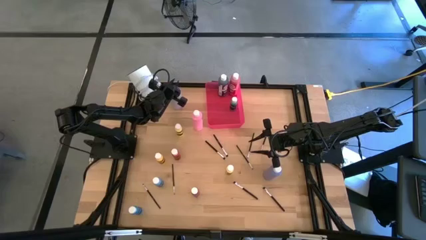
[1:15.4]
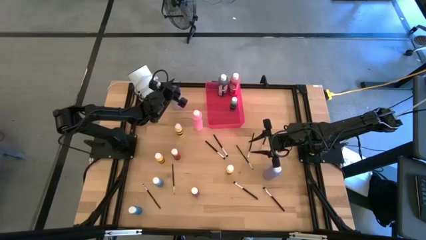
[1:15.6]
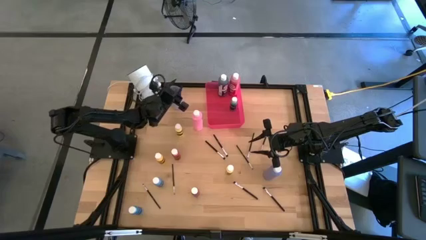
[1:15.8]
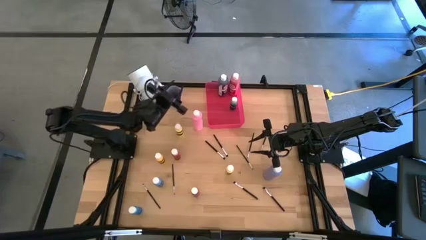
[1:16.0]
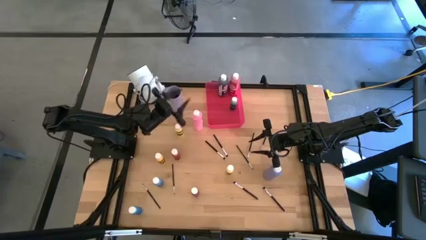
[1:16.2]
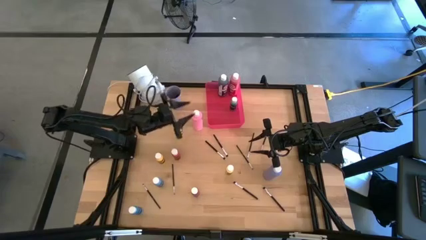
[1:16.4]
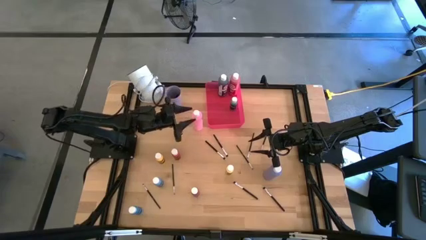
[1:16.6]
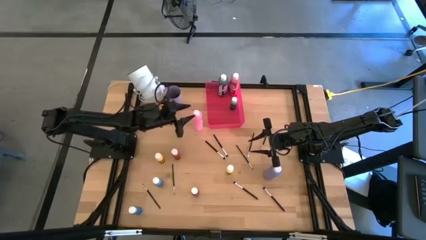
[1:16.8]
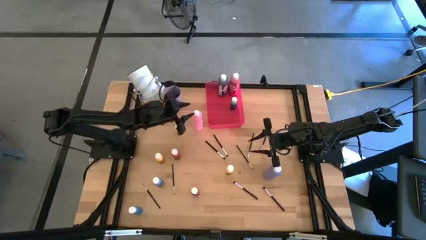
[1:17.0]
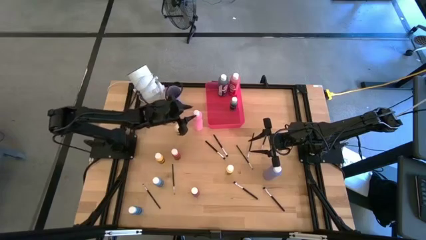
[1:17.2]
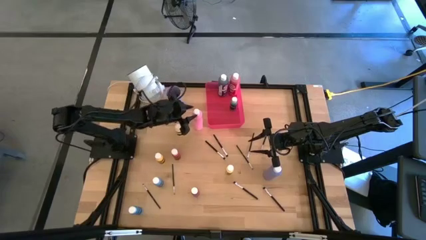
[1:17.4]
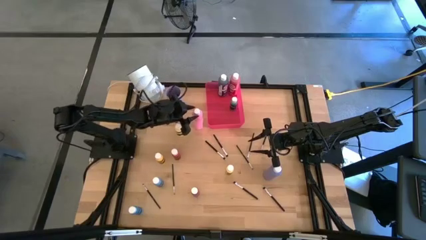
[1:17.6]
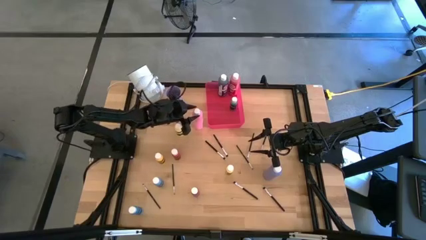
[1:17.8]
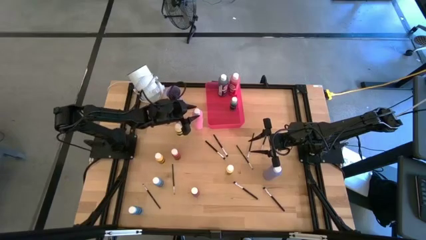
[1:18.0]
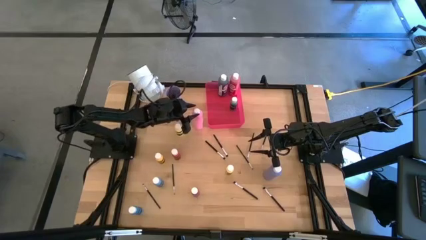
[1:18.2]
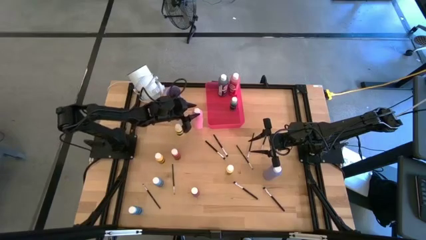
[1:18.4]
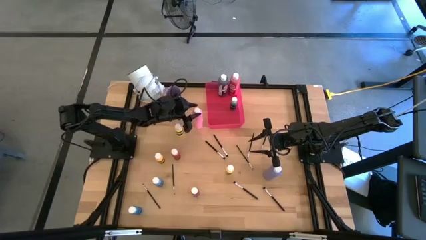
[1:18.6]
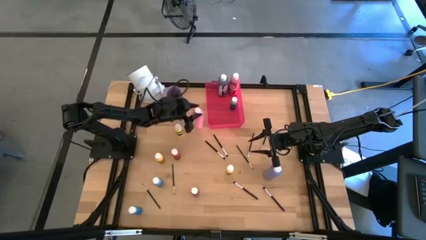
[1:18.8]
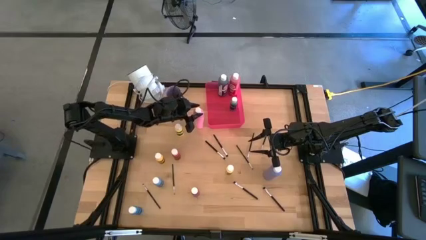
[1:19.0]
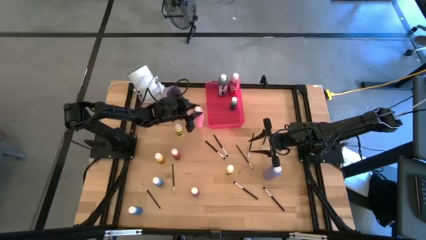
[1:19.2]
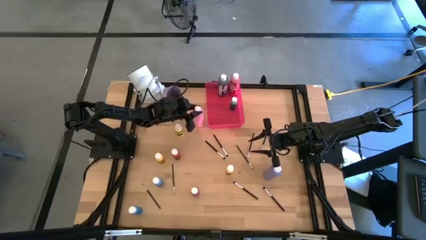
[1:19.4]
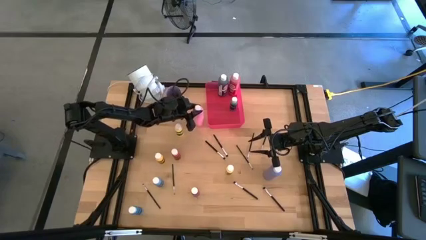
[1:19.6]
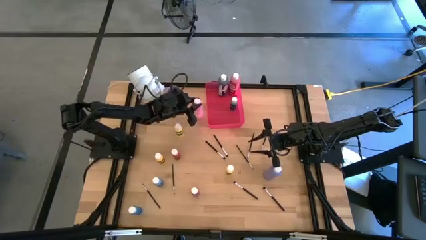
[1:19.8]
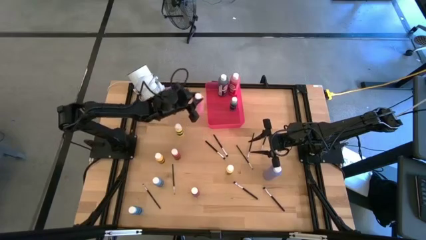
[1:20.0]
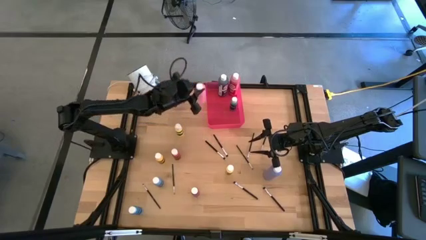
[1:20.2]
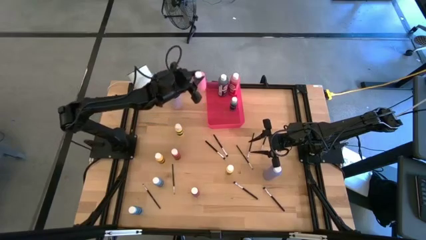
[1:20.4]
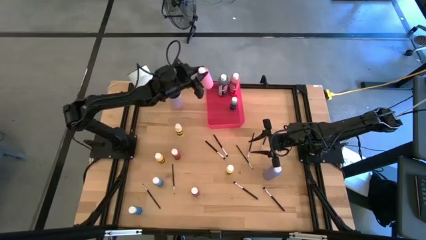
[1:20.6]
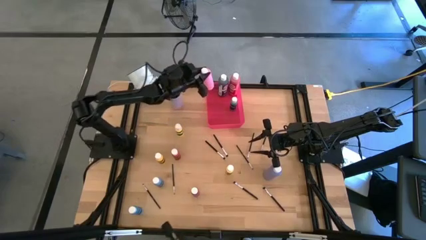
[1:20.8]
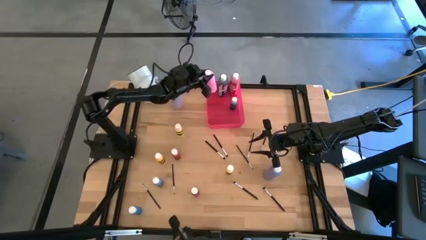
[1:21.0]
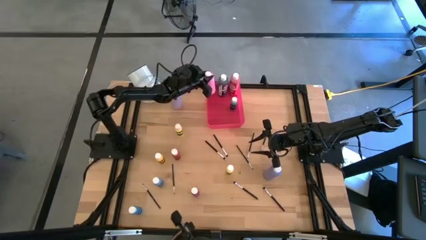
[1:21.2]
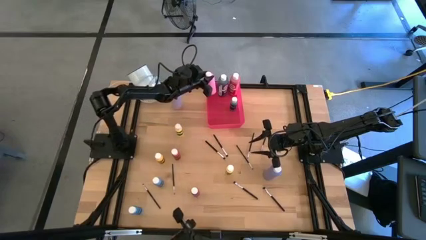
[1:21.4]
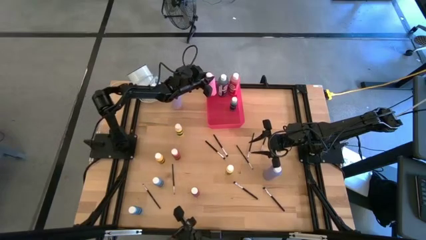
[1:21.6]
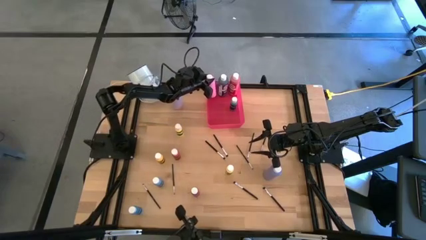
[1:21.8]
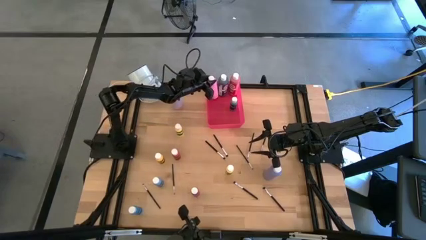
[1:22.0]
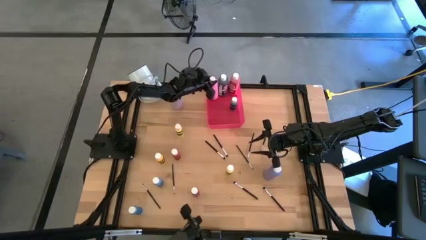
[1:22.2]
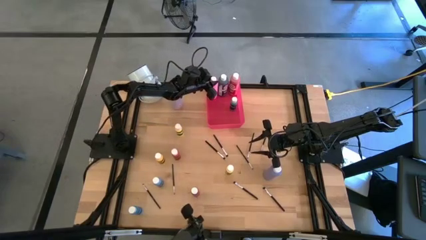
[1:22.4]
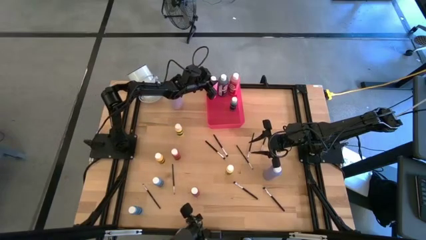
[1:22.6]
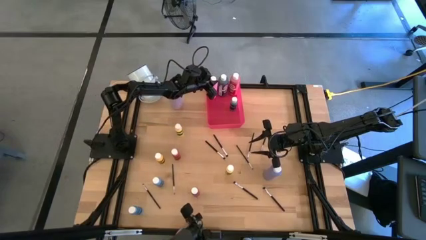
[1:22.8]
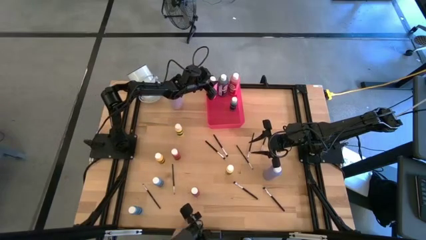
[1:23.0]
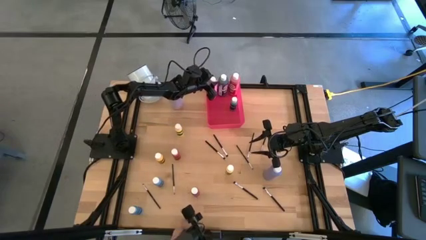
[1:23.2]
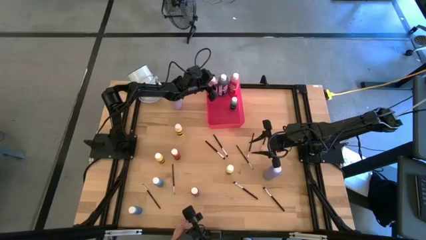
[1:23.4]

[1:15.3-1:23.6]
Task: Pick & Place Paint Supplies
Put the pink paint bottle into the red bin

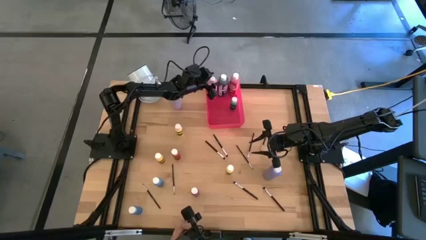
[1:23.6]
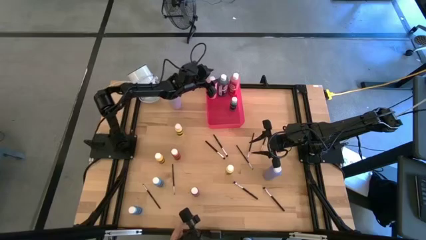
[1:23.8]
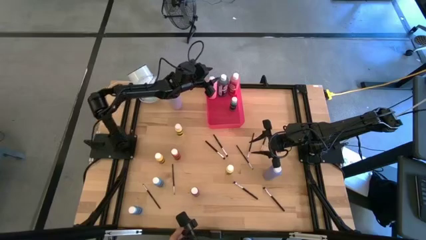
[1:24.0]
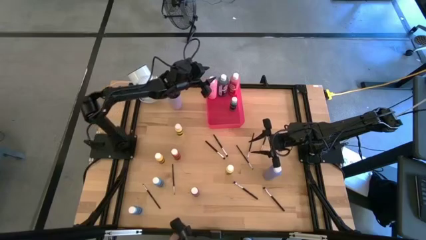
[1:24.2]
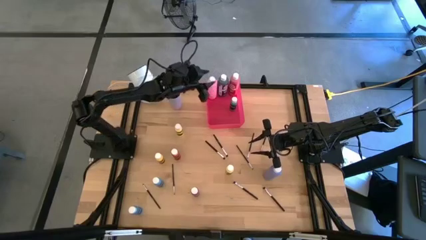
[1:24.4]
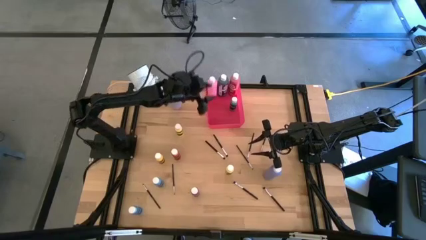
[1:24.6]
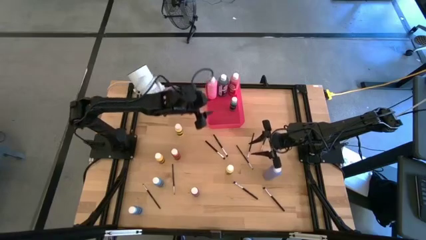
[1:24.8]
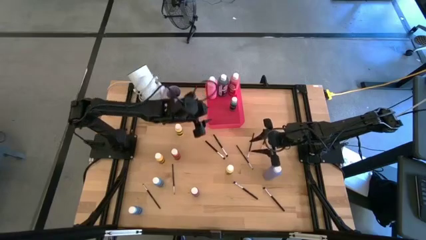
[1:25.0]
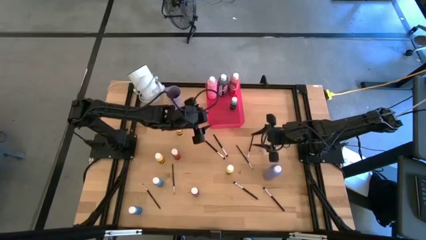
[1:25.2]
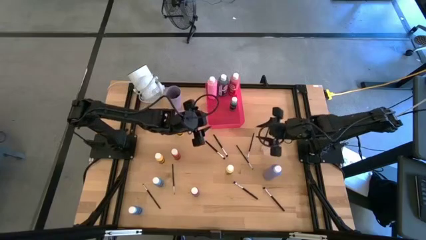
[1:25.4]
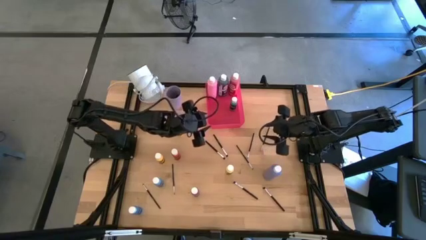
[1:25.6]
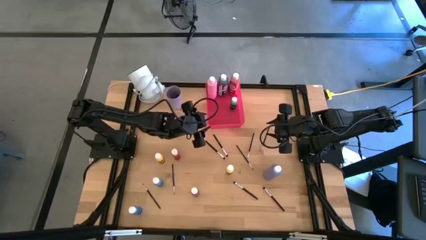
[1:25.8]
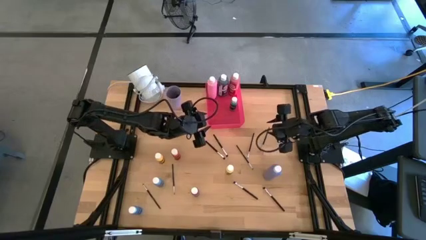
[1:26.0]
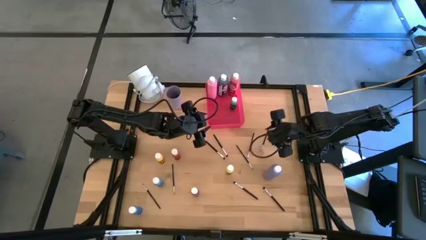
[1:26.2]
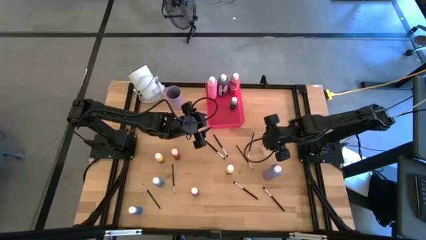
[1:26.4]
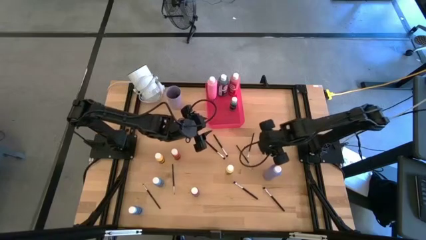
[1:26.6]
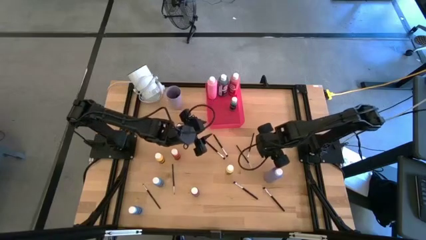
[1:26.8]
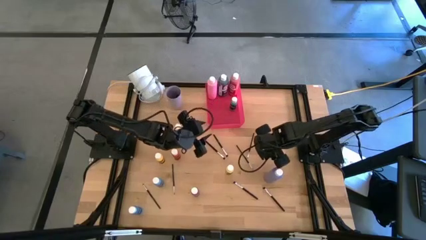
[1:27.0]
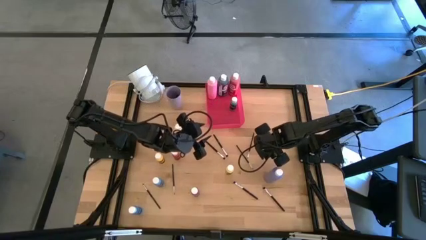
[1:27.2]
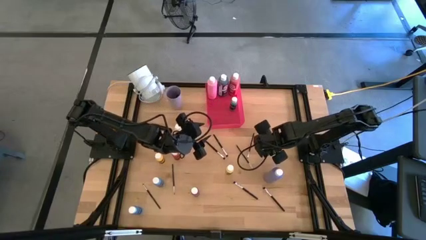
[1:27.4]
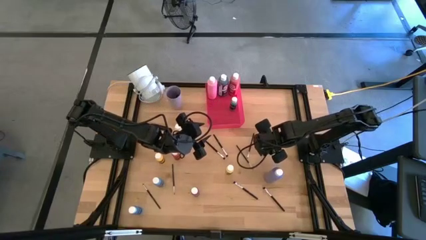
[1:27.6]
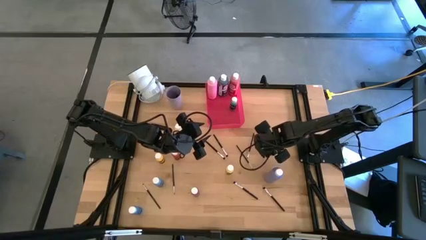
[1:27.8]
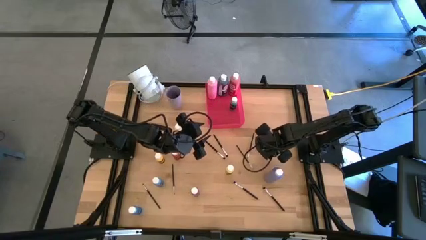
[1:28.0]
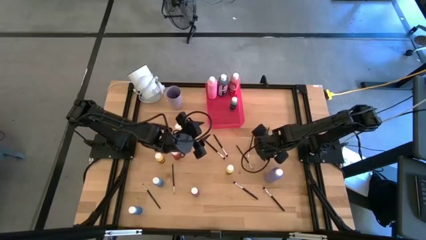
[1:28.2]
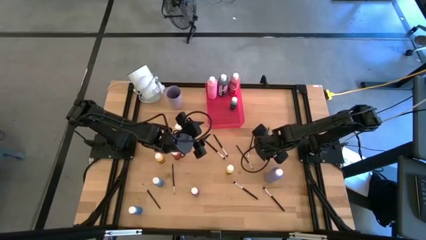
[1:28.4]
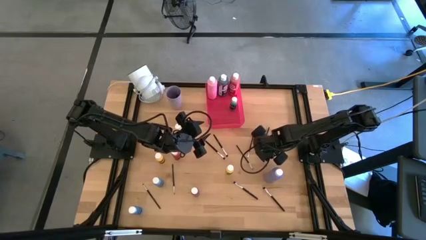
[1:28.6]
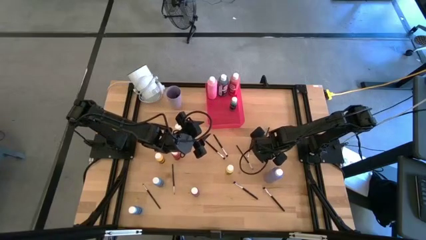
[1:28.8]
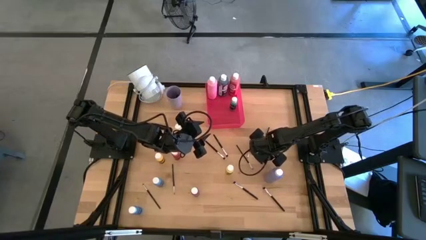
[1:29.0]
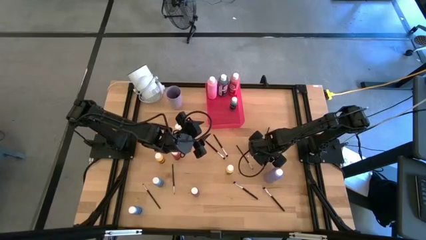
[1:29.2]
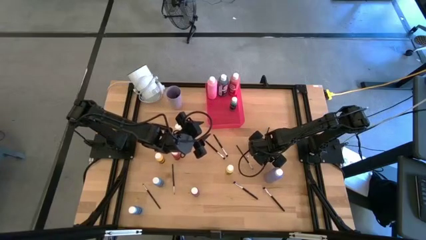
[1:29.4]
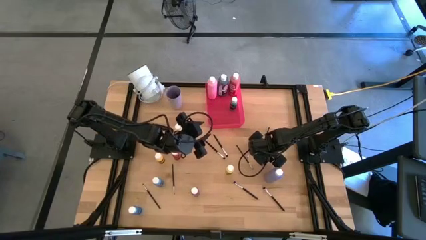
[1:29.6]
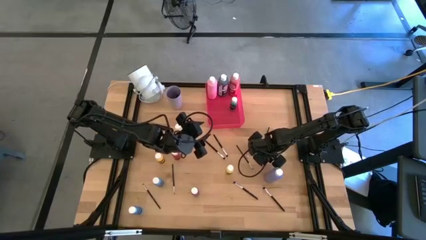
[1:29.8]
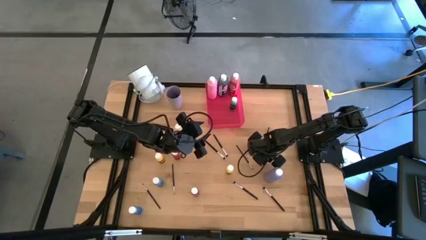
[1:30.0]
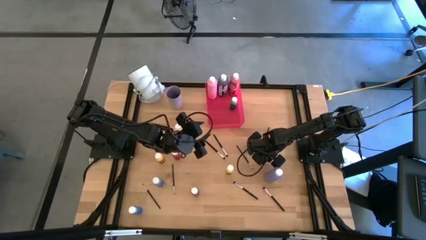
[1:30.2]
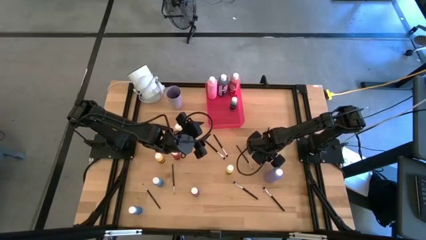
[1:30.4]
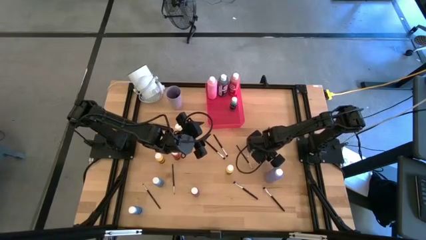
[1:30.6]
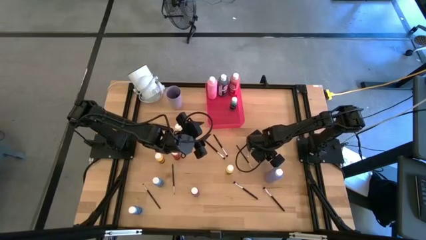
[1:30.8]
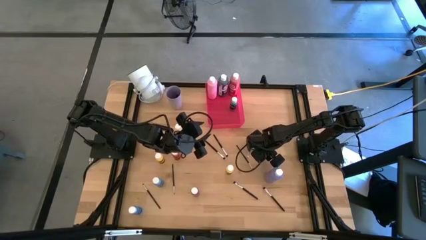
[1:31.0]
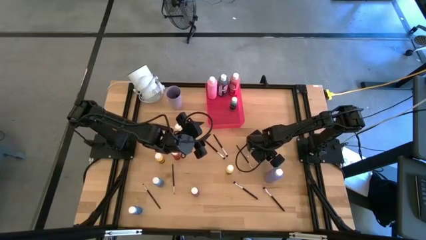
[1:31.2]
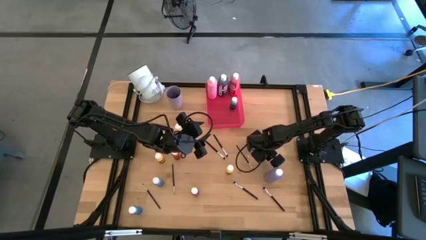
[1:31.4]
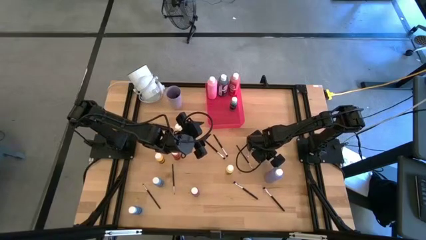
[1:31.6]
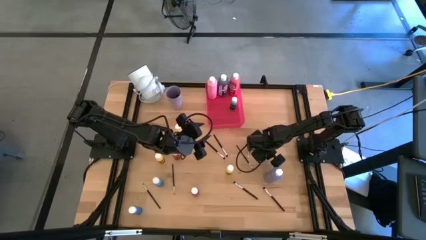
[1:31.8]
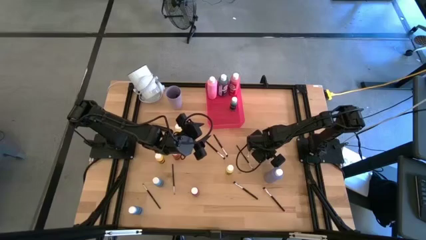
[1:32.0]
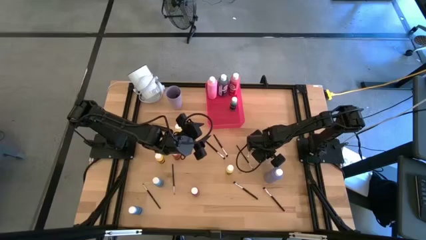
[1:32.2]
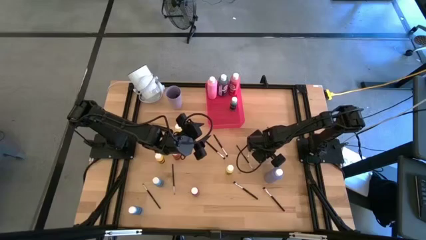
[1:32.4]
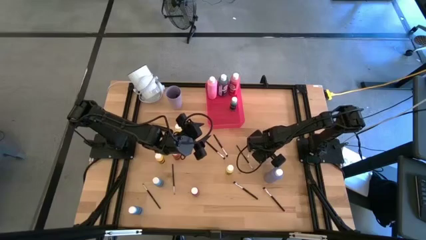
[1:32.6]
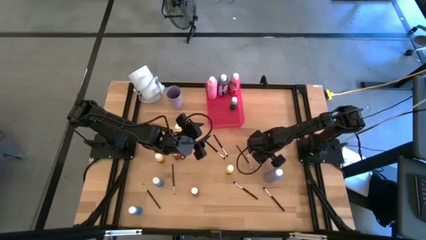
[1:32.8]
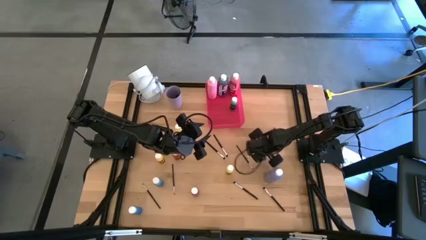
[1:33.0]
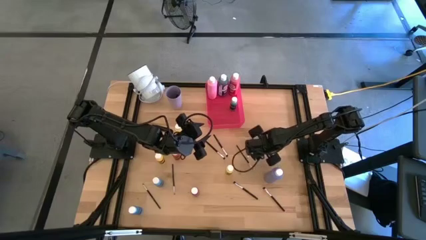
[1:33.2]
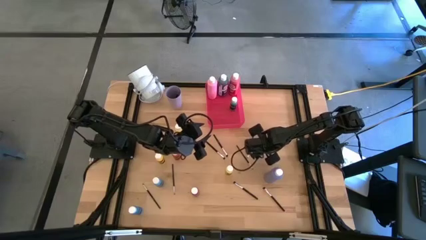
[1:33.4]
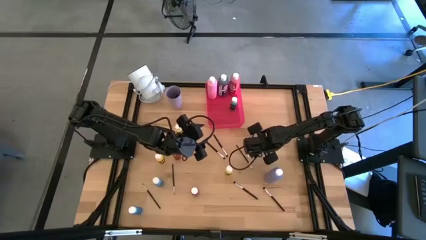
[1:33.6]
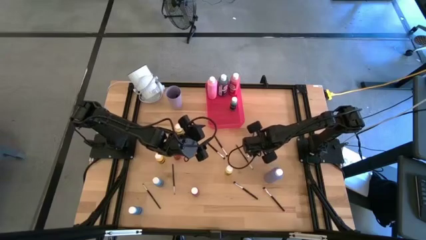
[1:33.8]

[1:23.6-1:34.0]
Put the black paint brush into the purple cup
